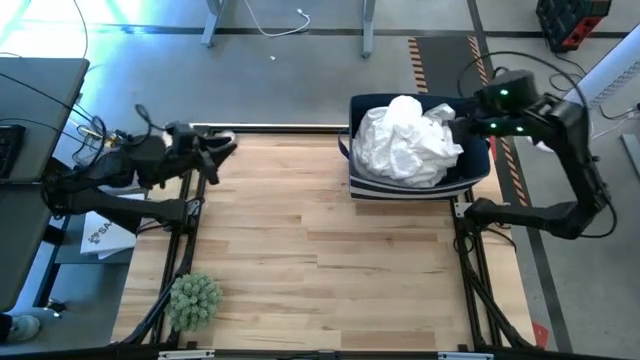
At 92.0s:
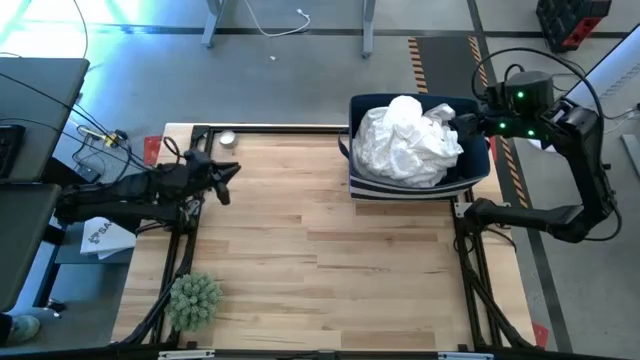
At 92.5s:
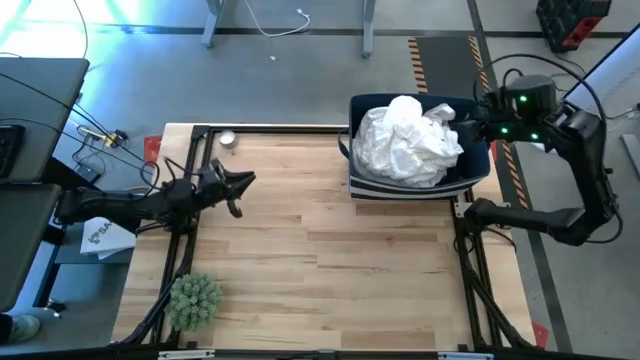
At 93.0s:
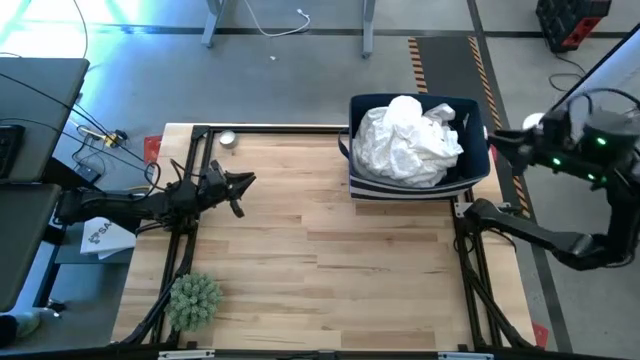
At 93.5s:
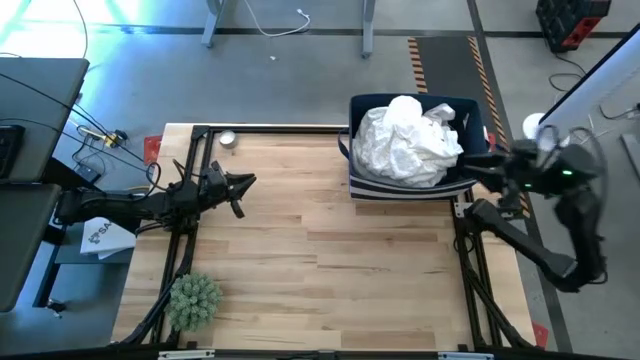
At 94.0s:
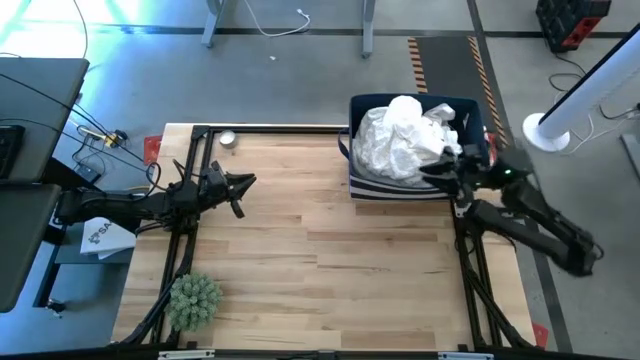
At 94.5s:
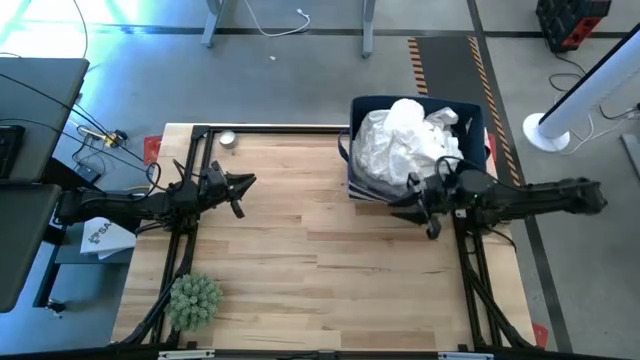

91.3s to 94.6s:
Task: Sort clothes
Return to Home Position

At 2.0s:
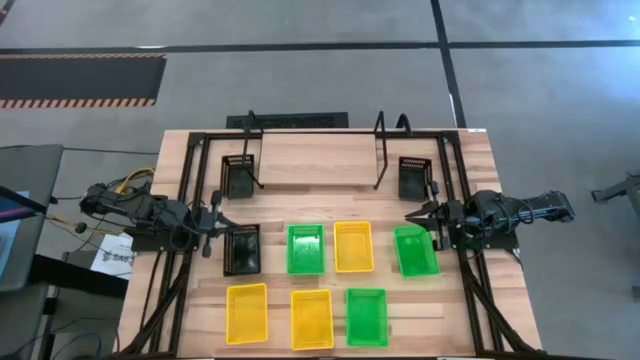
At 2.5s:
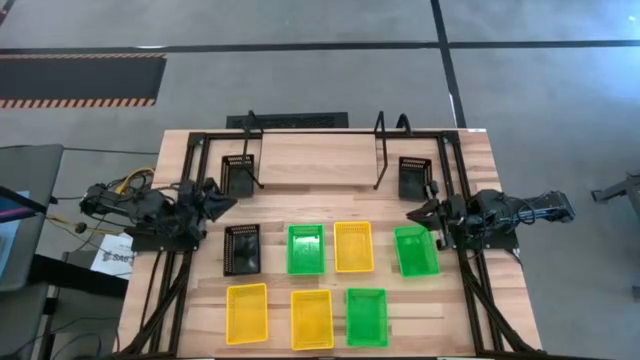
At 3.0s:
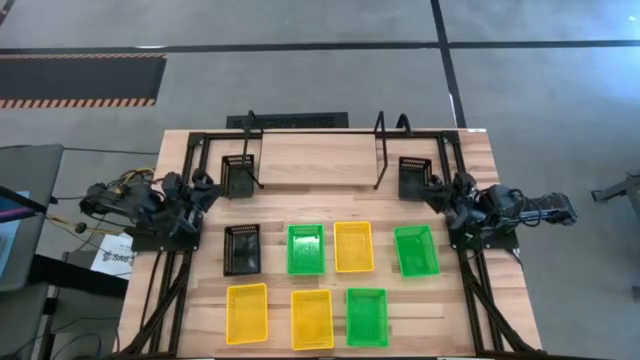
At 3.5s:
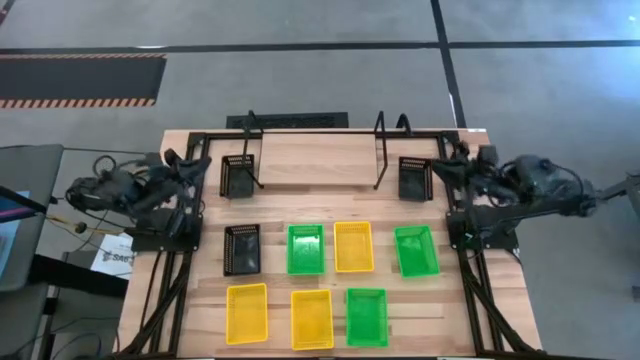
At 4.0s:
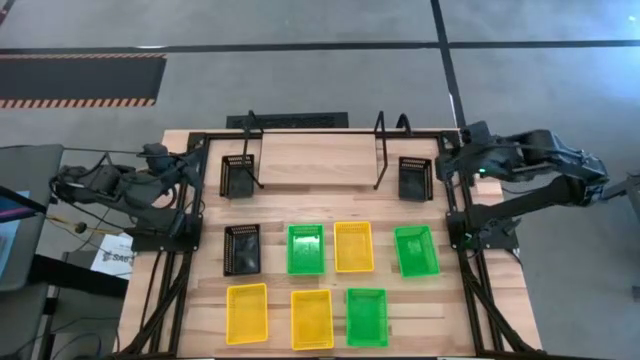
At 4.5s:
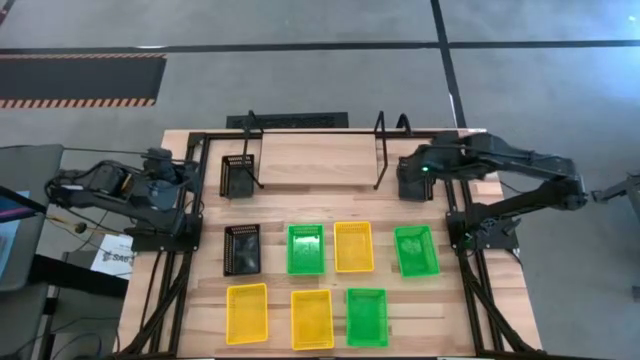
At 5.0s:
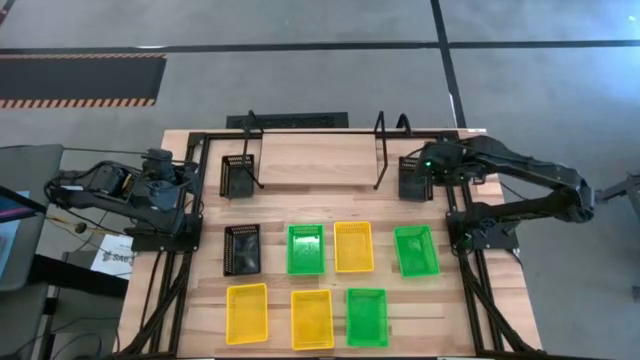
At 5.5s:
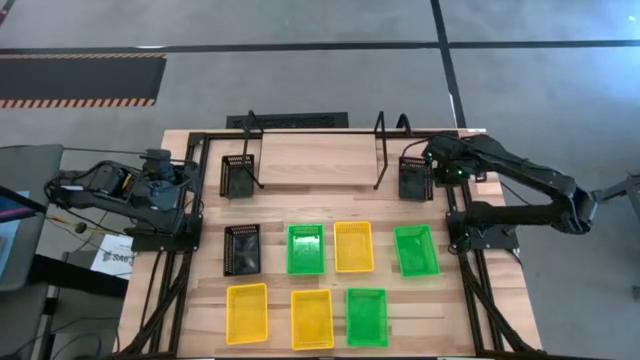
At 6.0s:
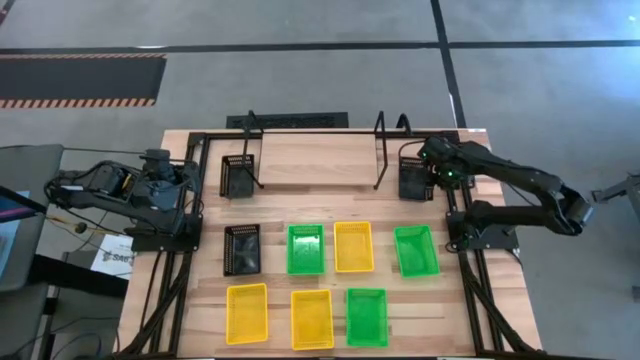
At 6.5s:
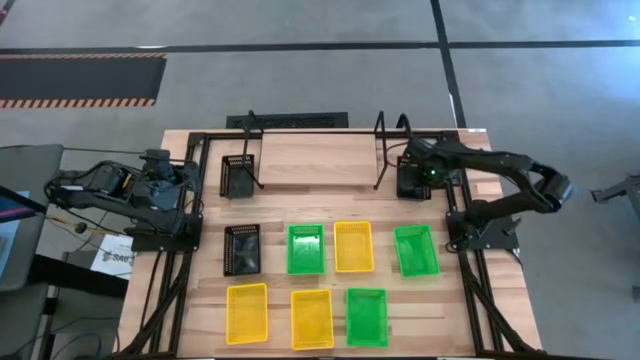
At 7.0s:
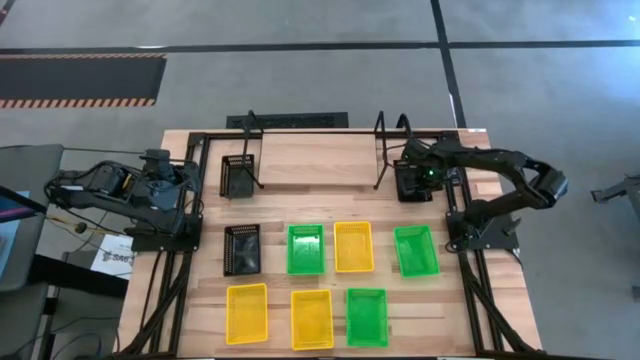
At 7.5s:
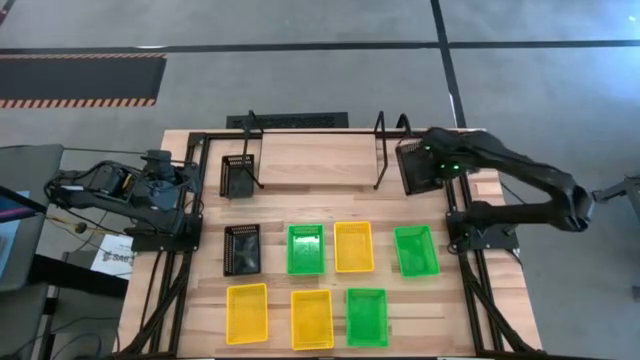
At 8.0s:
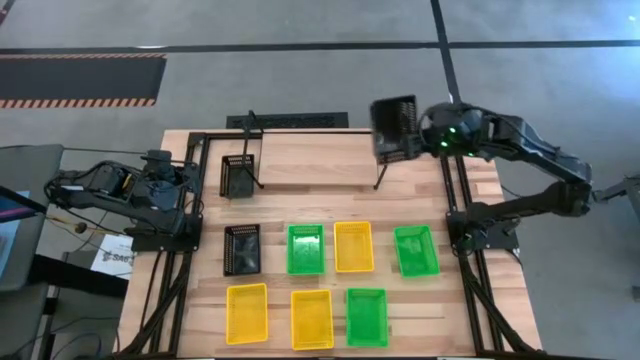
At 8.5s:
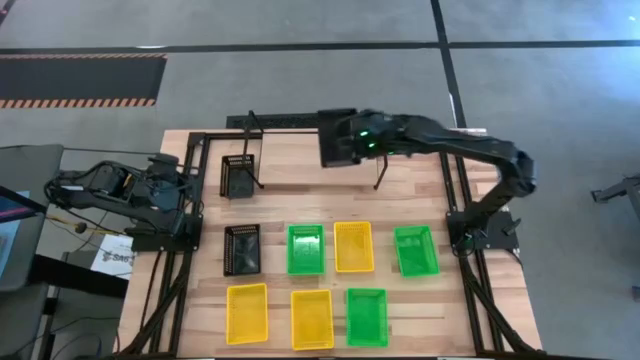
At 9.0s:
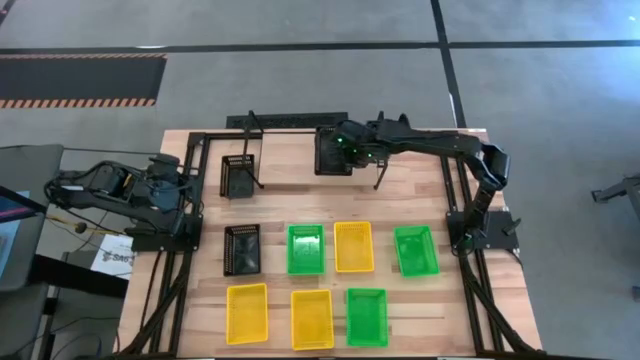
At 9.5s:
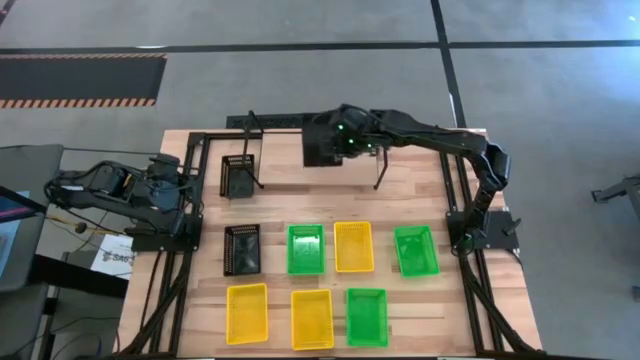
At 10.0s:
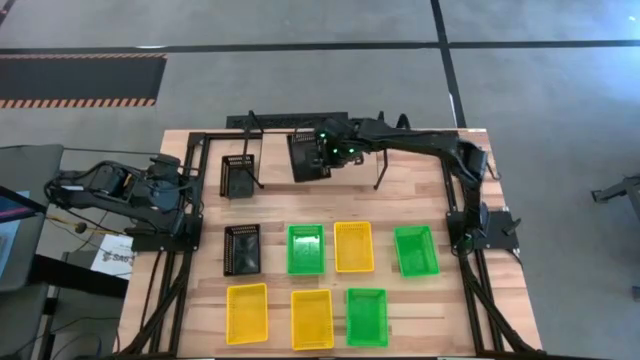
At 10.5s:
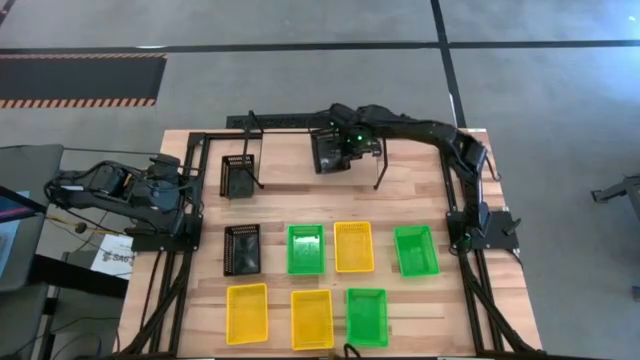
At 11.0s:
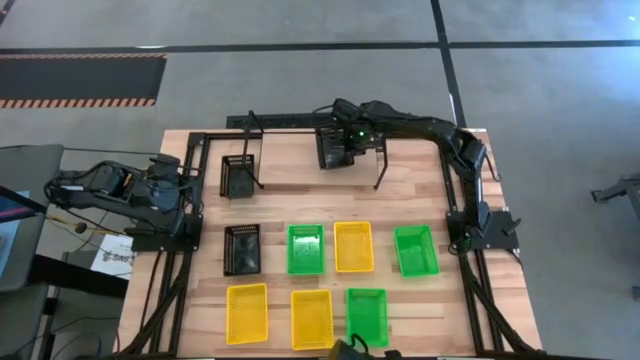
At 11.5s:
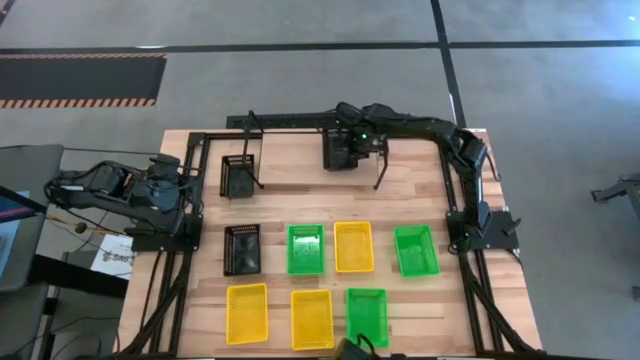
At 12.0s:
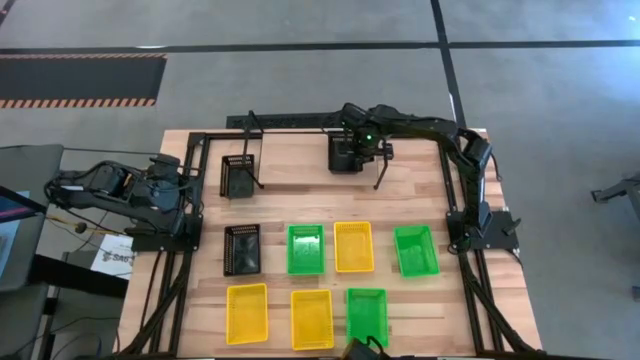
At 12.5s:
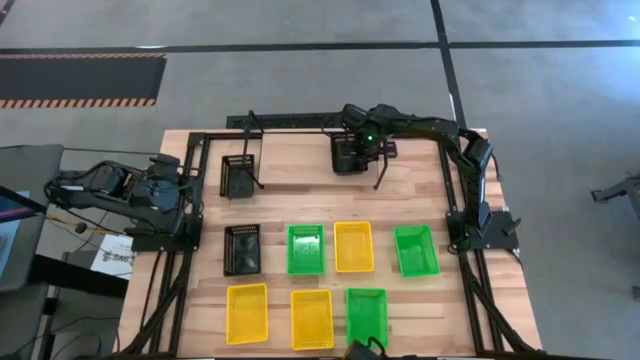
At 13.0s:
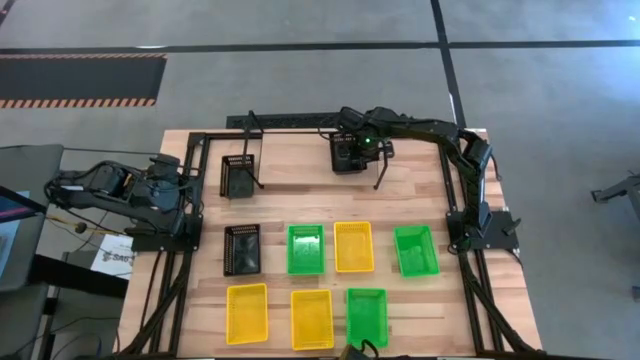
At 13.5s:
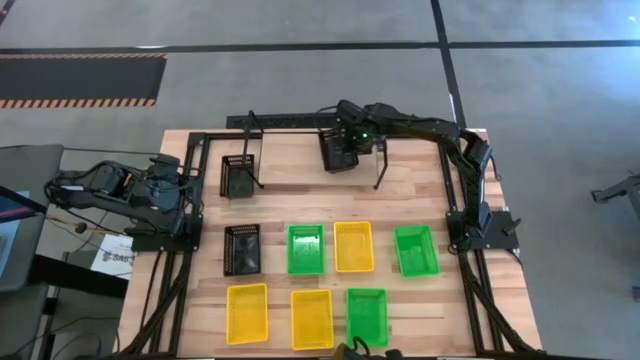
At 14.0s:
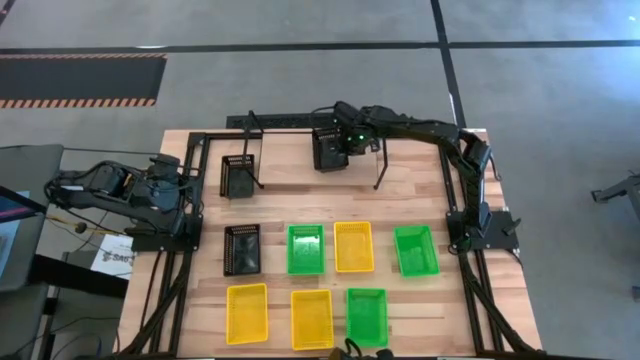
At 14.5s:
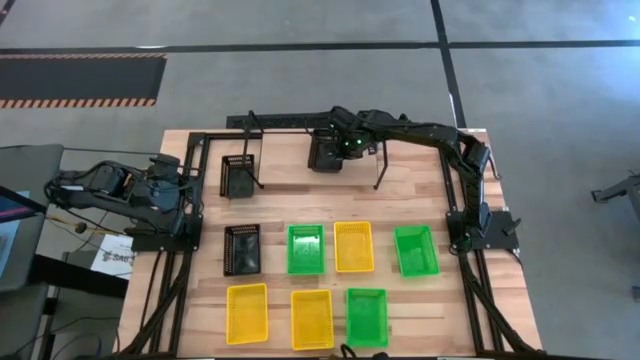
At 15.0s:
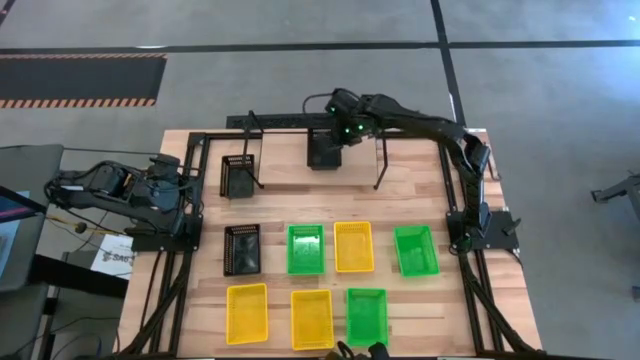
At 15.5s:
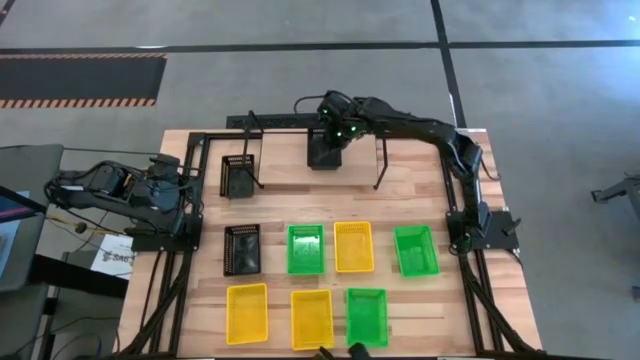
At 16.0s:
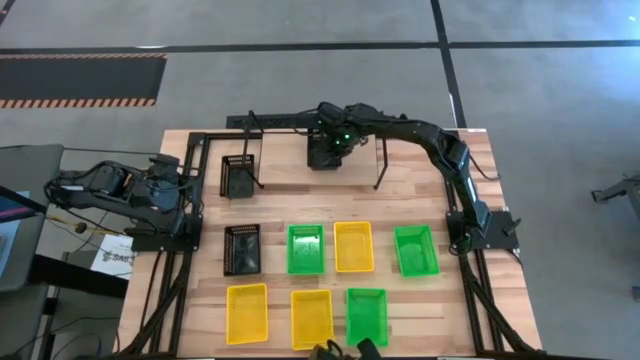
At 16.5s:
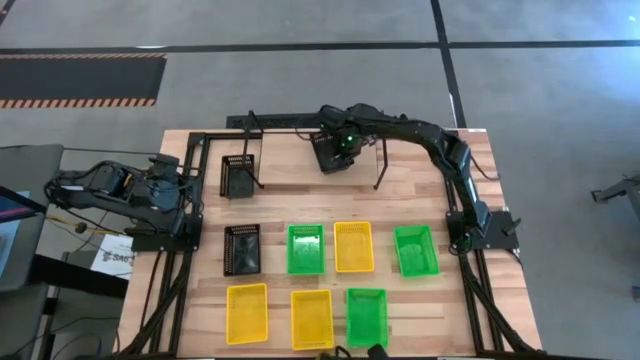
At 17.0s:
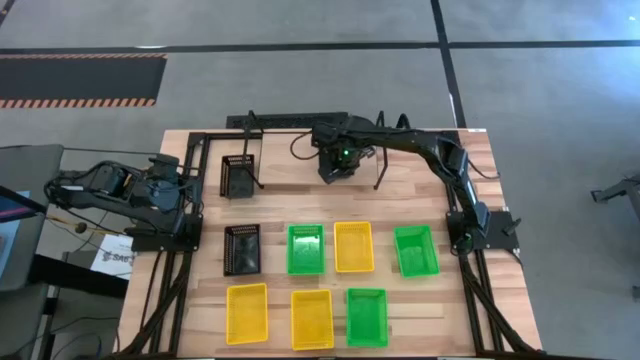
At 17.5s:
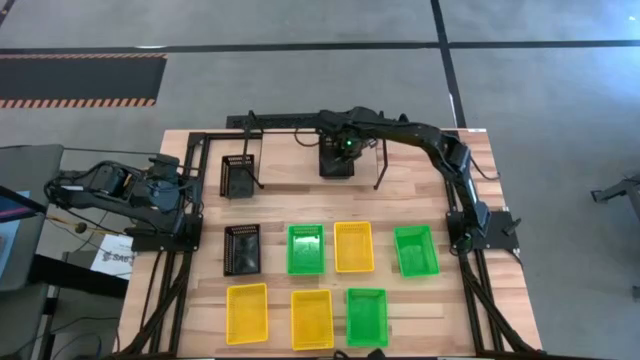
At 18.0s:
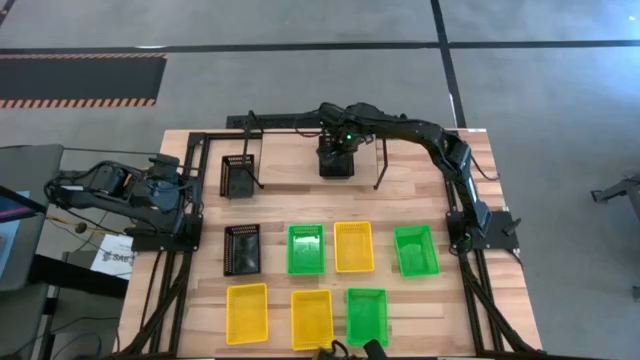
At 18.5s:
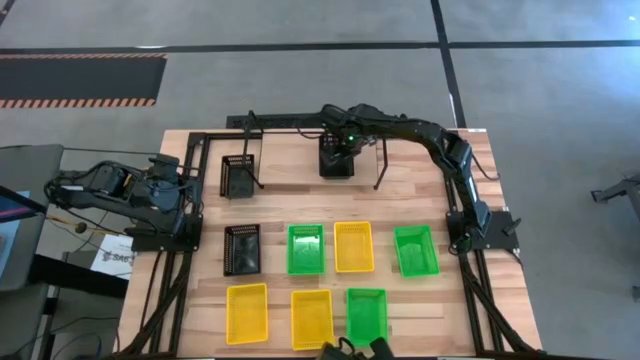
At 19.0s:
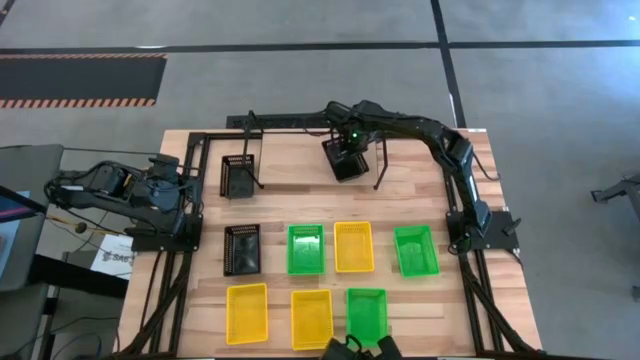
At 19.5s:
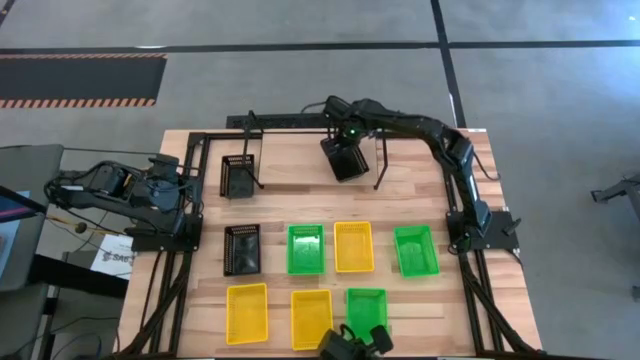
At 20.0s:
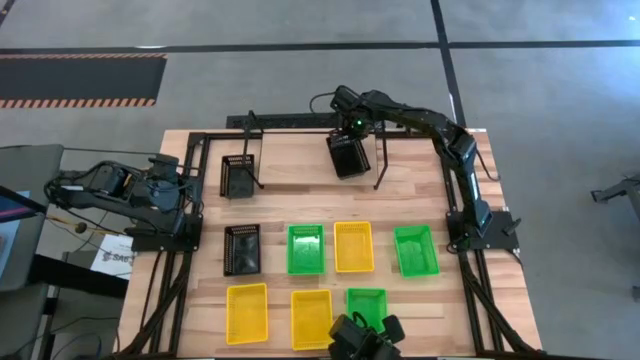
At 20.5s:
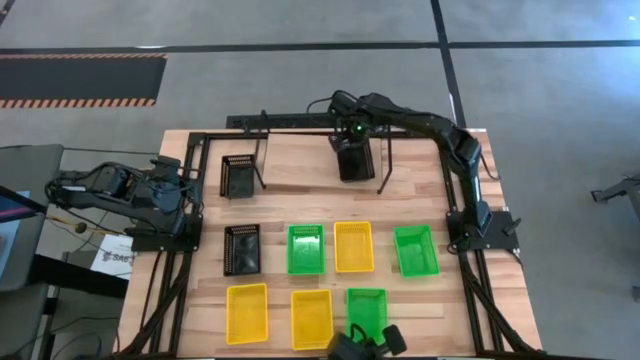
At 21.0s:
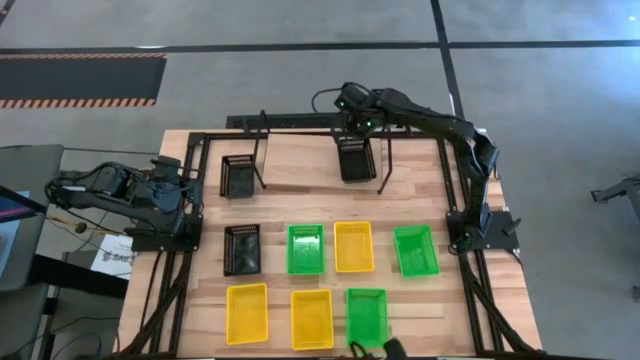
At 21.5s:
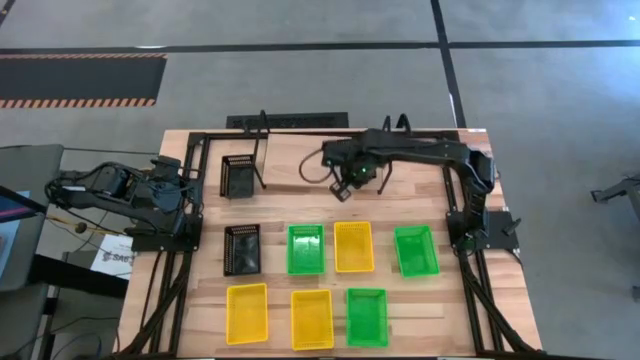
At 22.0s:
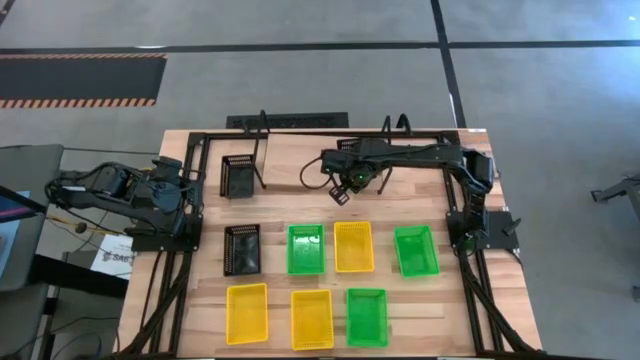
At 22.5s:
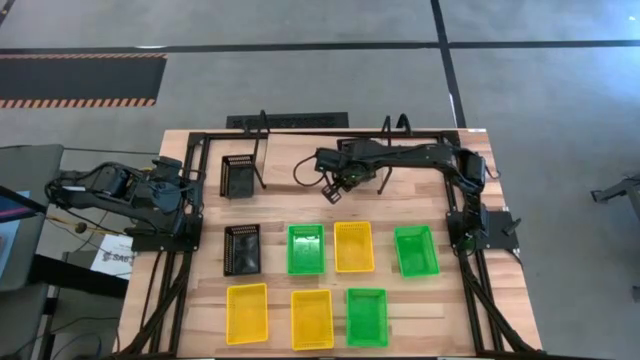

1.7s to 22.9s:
Task: Stack baskets on shelf by color
Put the right black basket on the shelf
